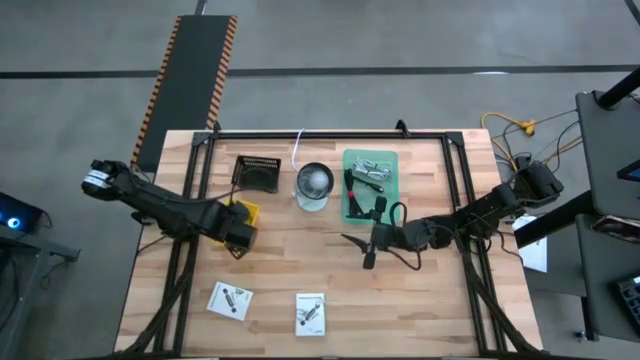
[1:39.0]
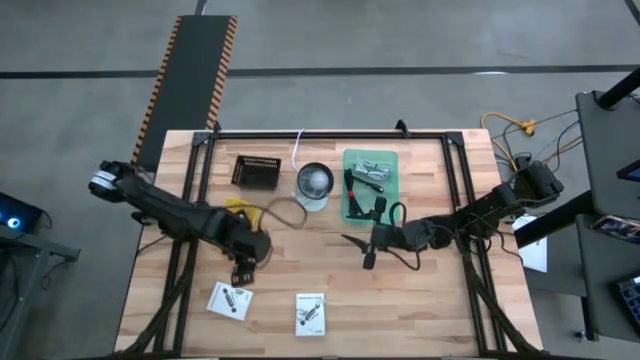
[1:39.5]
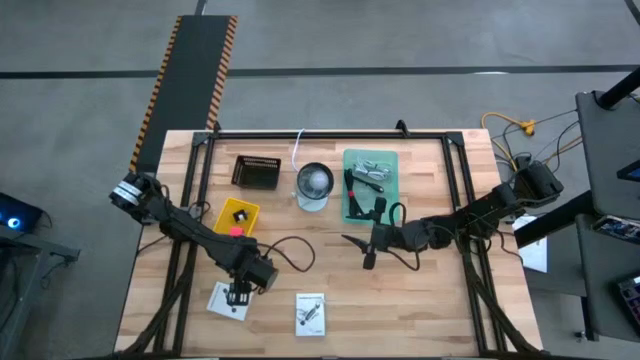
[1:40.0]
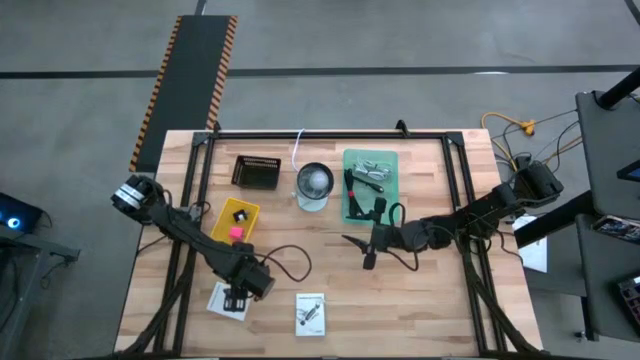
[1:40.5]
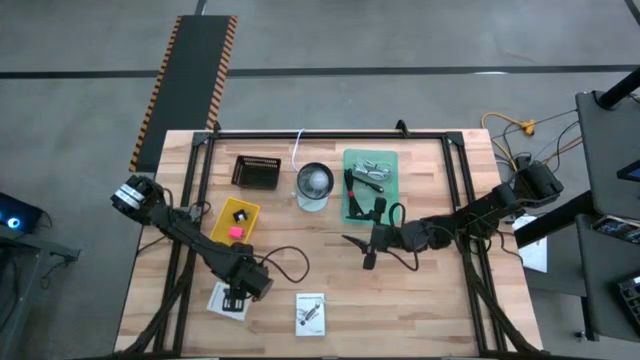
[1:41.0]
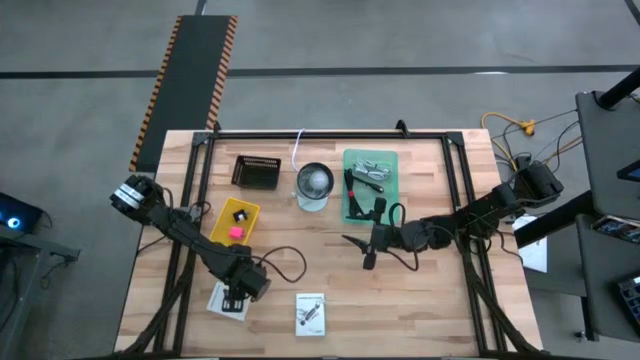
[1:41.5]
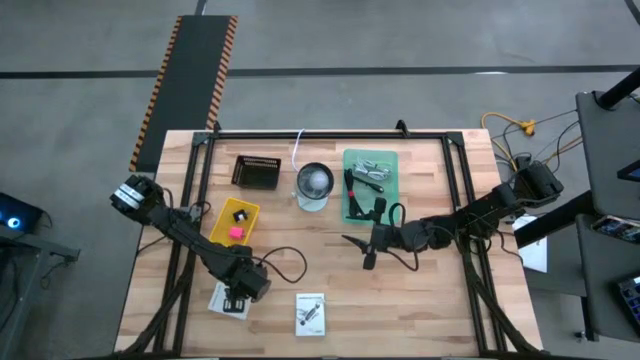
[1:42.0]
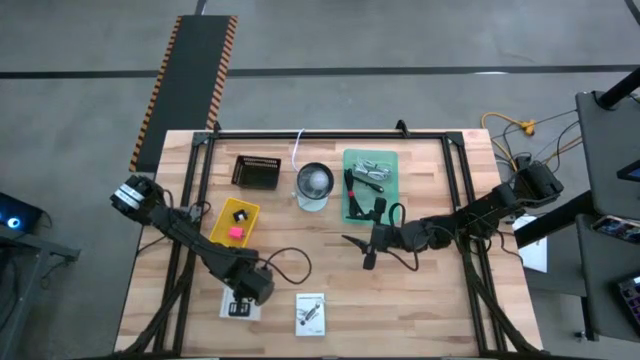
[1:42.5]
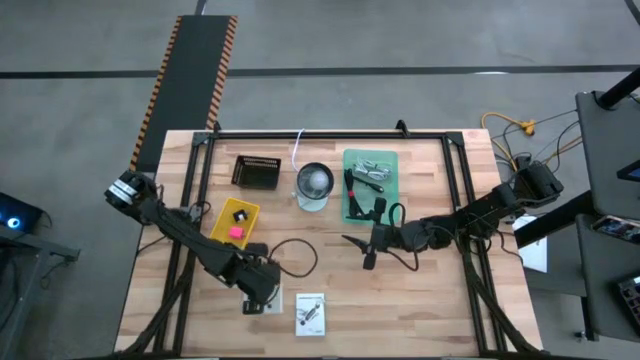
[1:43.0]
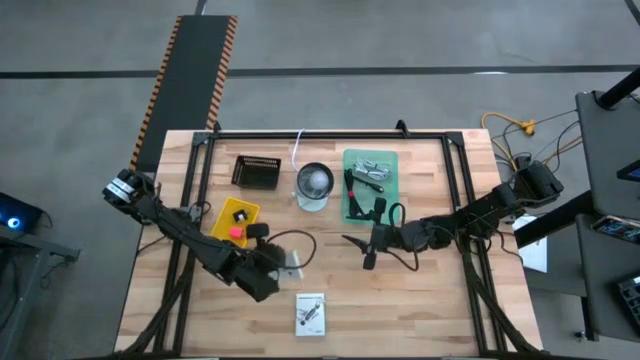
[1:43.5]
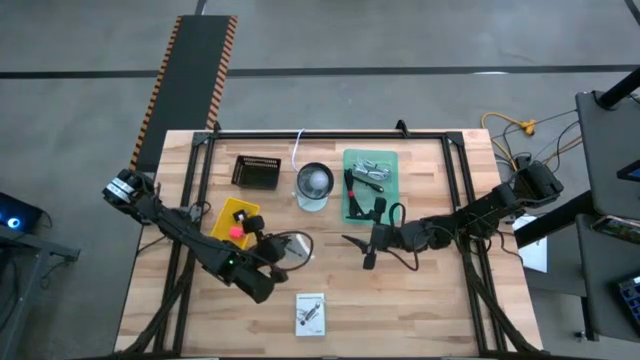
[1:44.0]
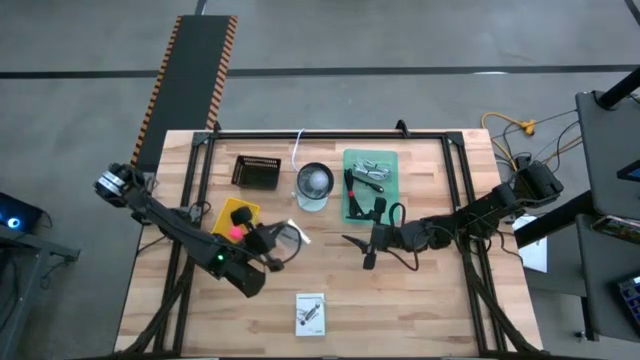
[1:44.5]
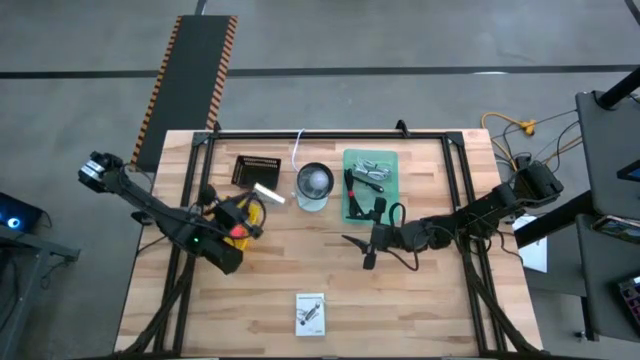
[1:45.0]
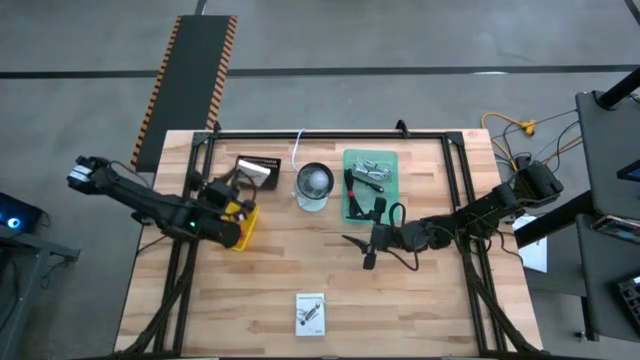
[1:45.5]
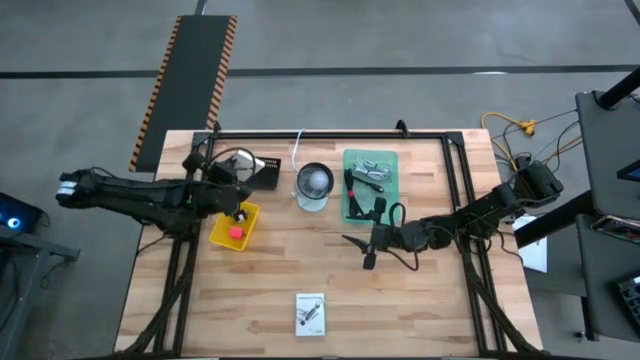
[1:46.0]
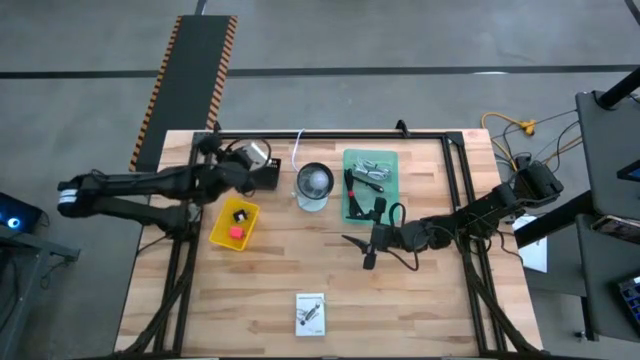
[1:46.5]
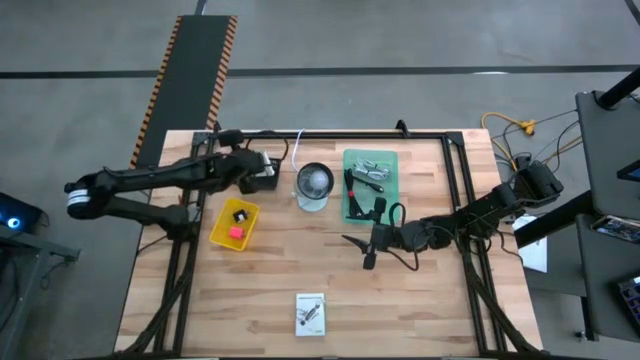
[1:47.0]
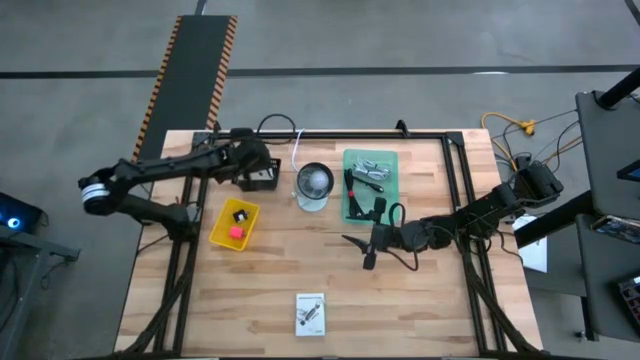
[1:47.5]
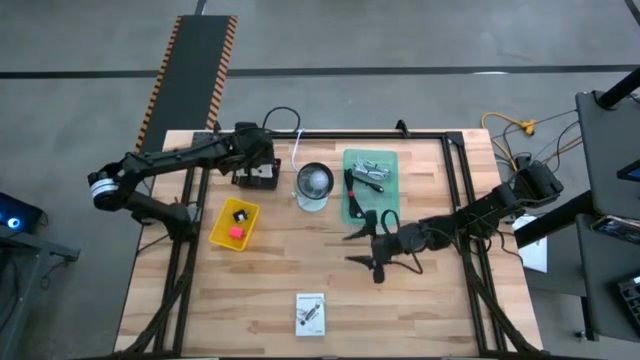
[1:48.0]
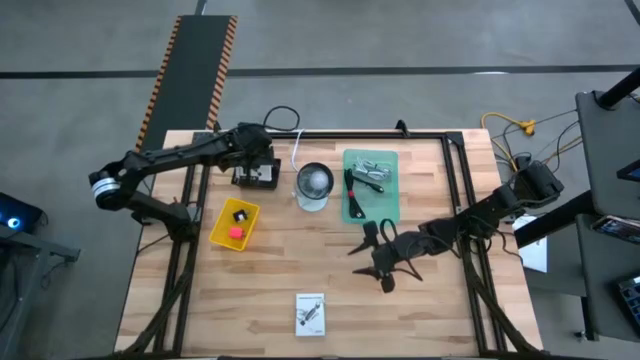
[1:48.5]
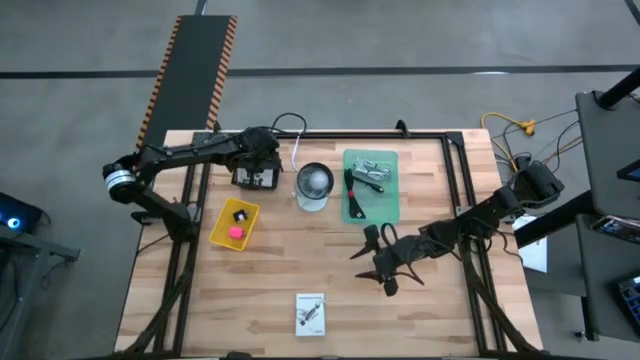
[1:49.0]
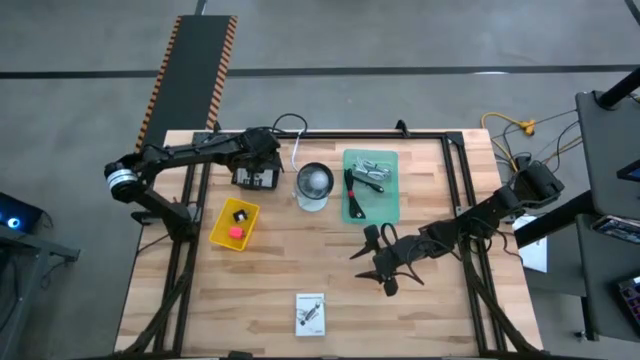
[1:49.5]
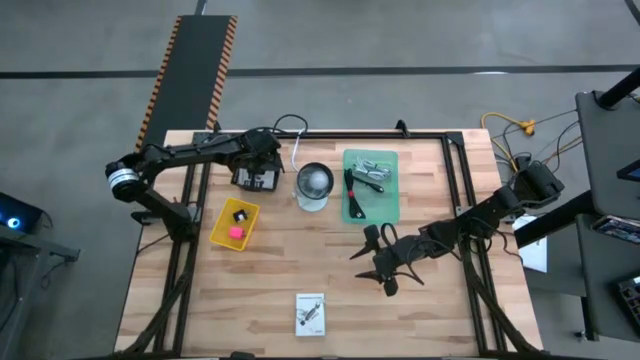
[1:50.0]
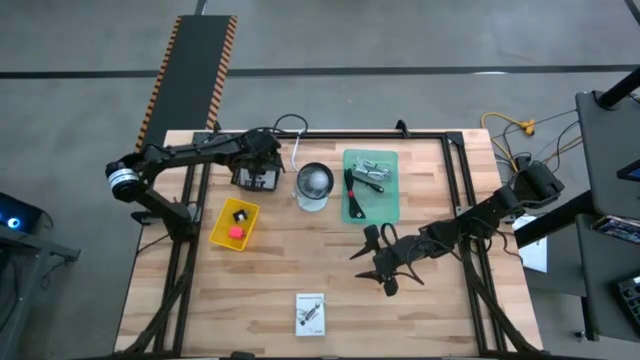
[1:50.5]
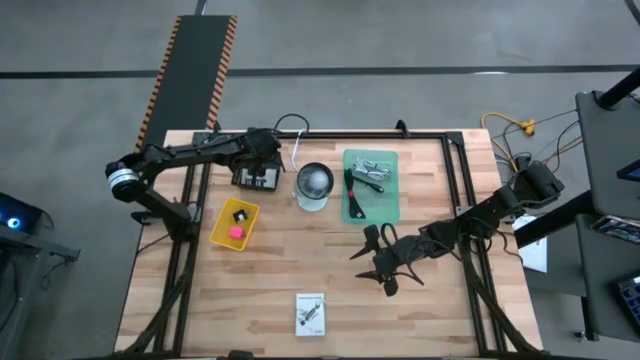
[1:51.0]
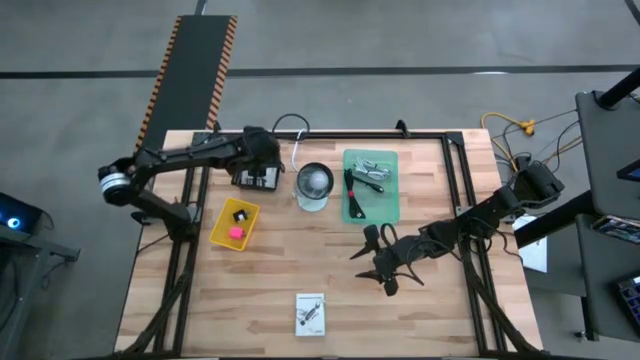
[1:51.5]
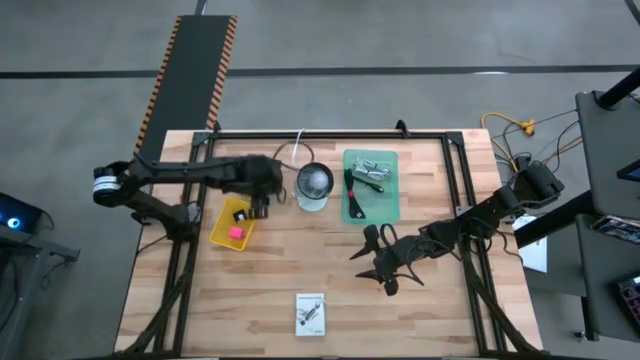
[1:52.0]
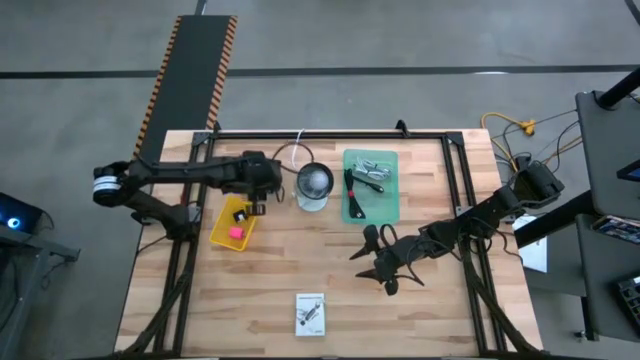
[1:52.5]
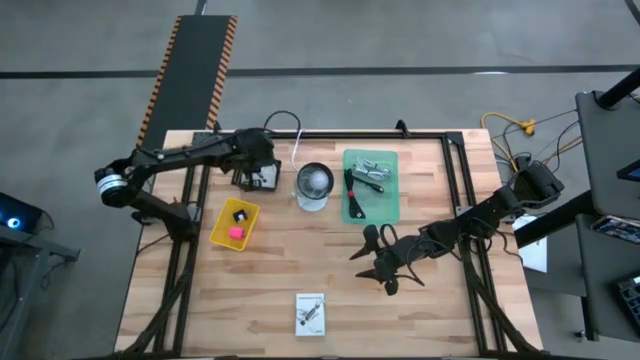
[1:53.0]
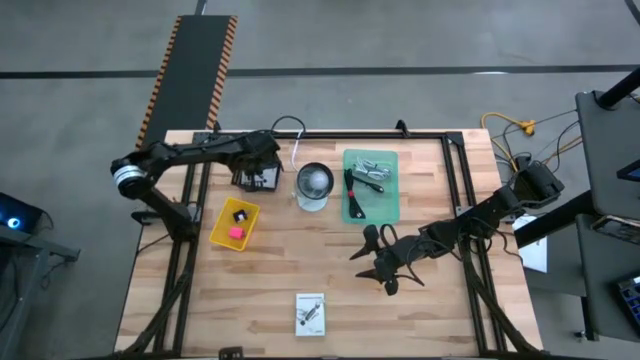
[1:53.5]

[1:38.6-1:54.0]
Task: Pick and place items into bin
Put the left white card reader box into the black bin

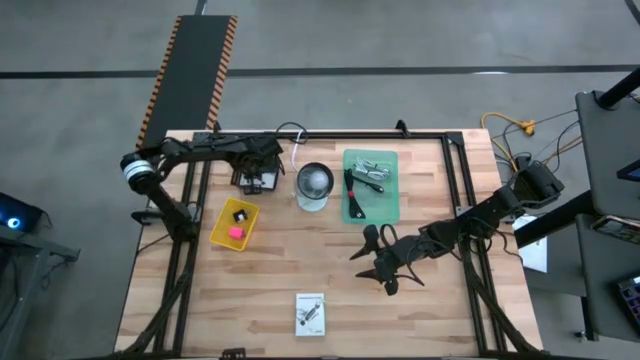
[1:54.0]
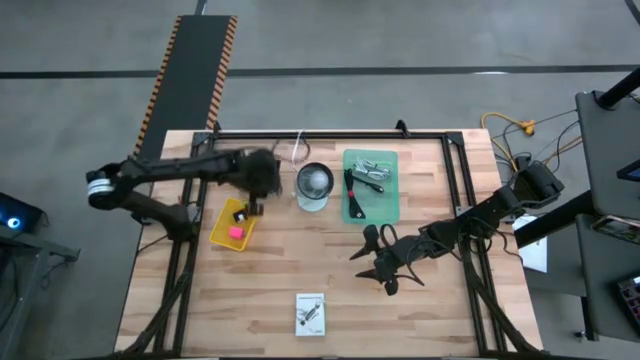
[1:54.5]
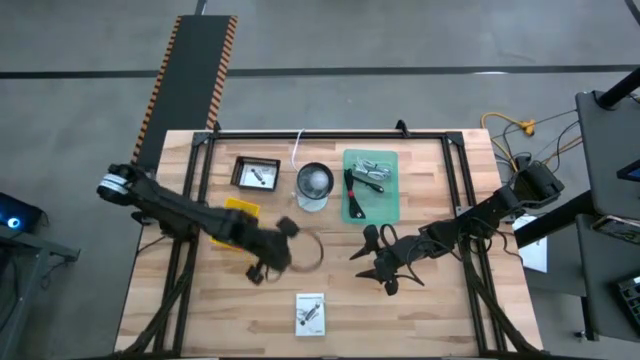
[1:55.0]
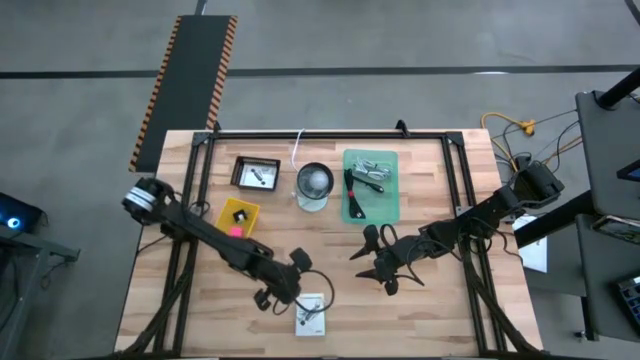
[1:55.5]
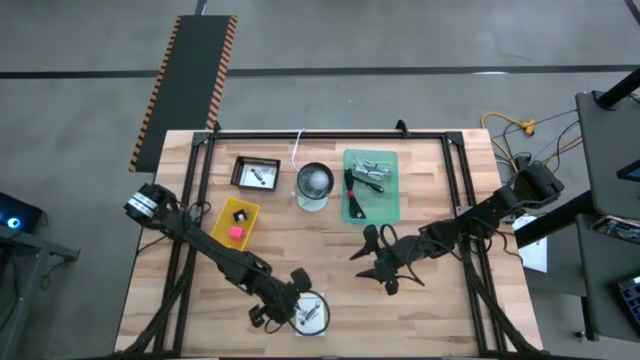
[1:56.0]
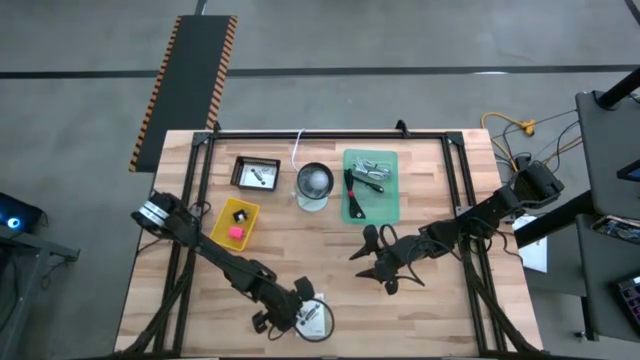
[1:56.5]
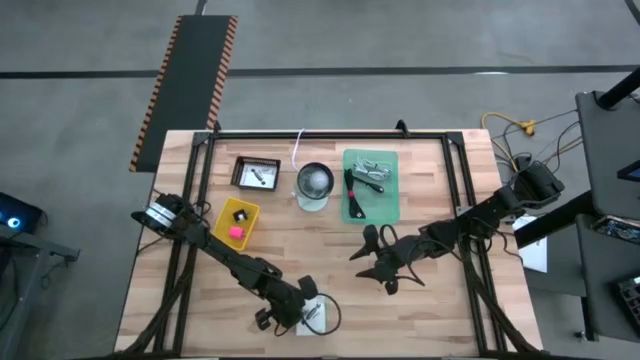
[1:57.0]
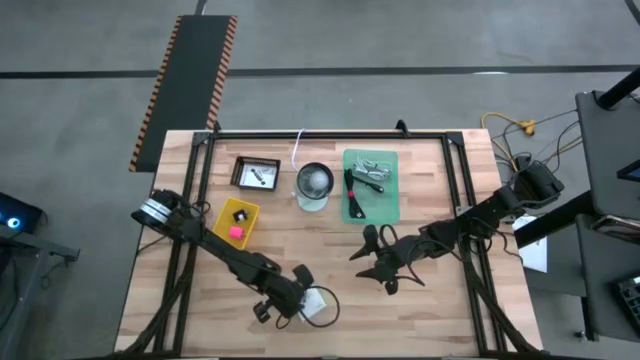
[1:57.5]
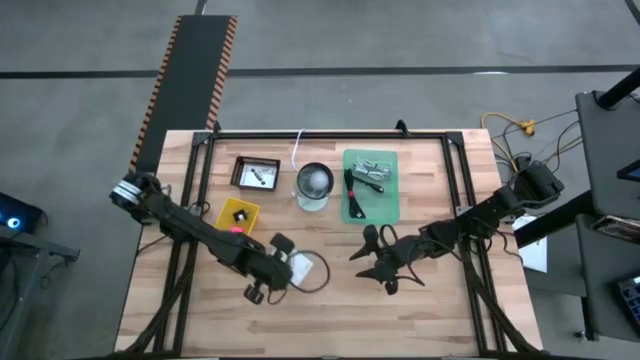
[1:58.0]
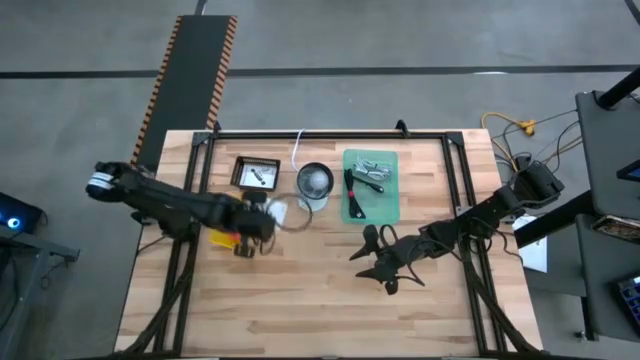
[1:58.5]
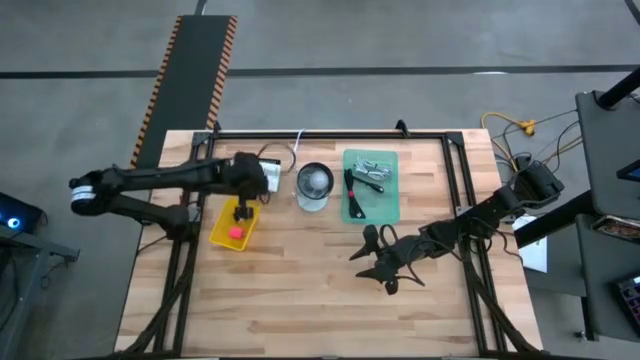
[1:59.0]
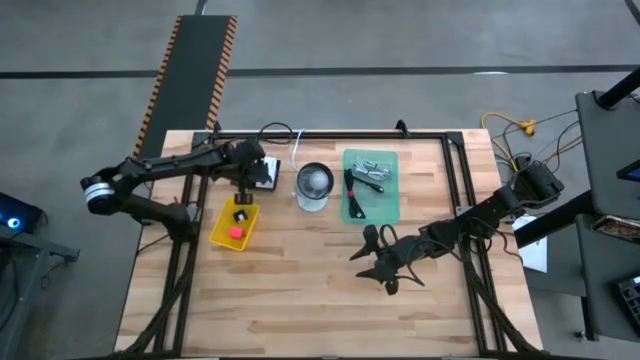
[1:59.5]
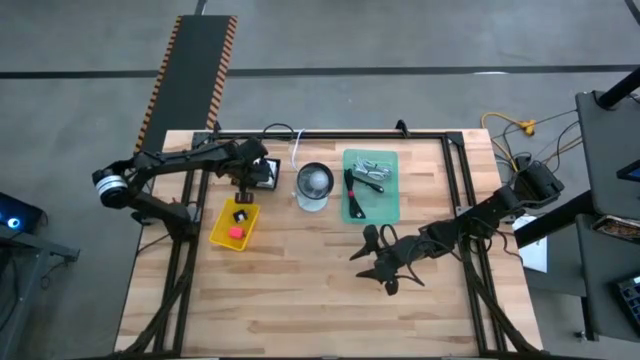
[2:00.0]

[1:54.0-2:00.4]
Put the white card reader box into the black bin

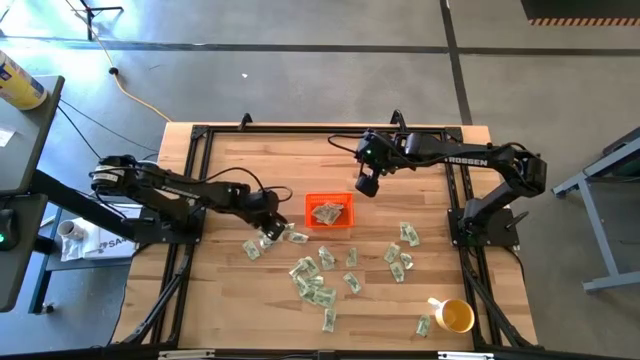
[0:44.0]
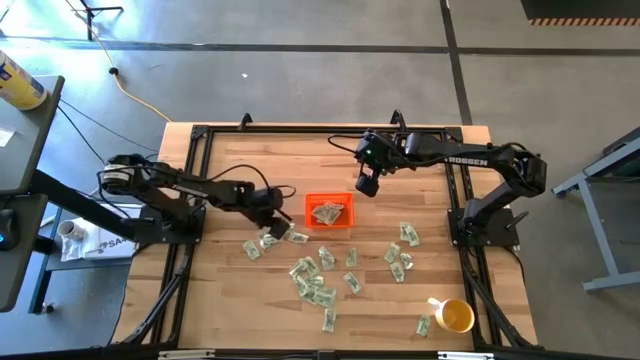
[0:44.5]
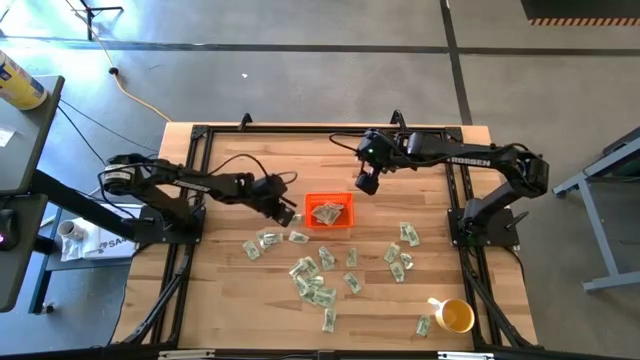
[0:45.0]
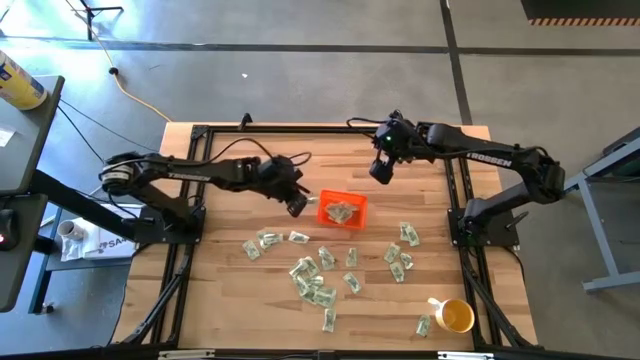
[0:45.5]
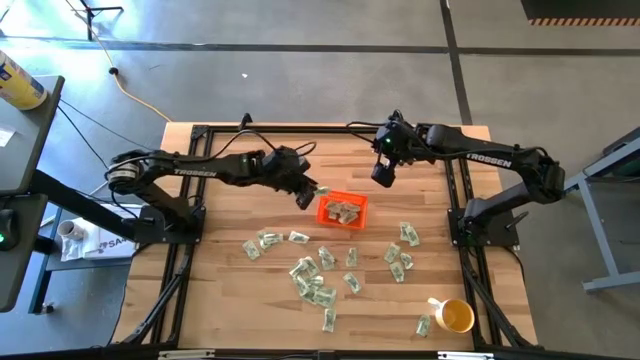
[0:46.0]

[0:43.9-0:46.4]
Task: Pick and place Stevia / Truvia into bins
Put the stevia packet into the orange bin
